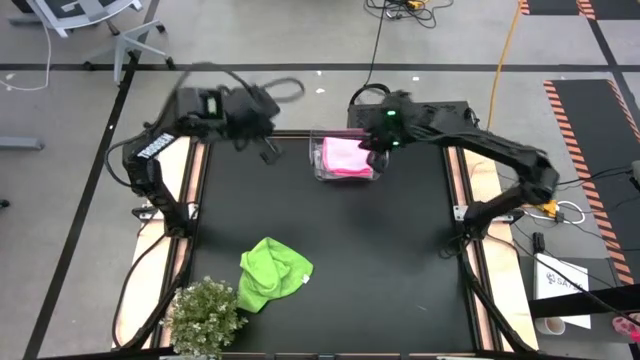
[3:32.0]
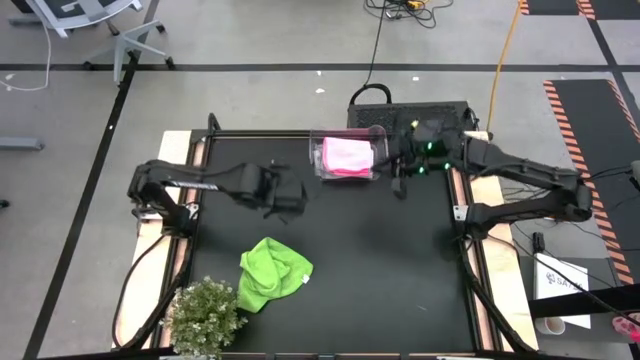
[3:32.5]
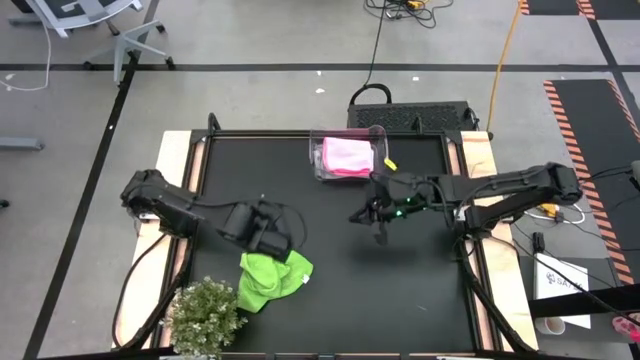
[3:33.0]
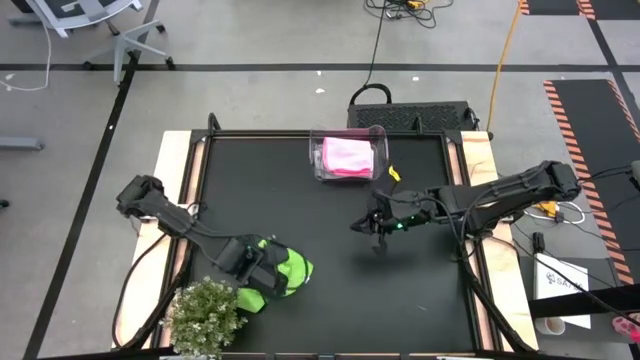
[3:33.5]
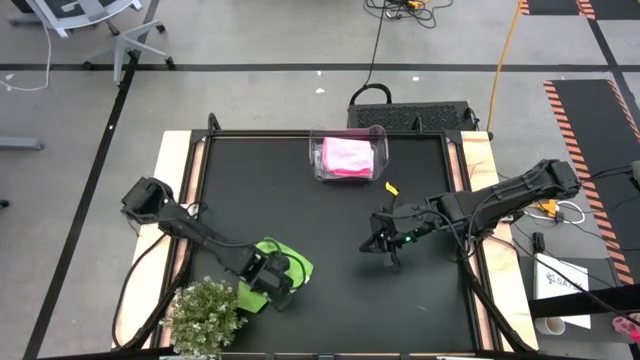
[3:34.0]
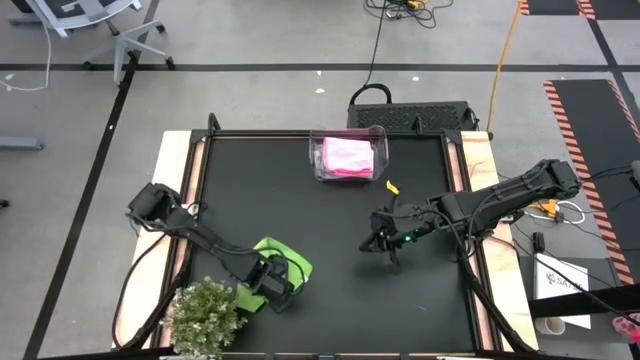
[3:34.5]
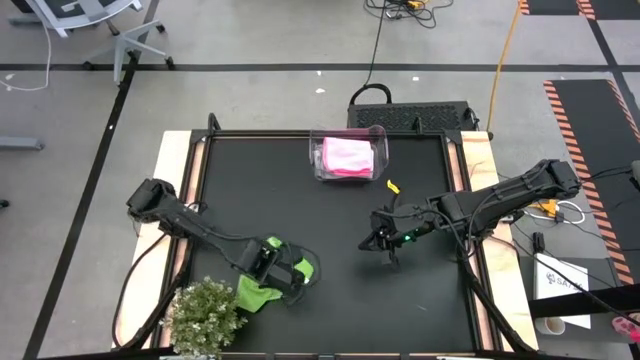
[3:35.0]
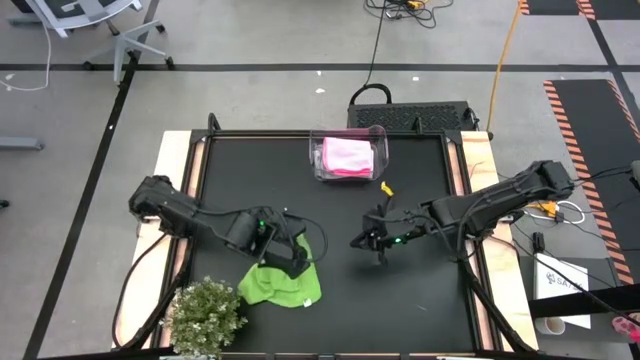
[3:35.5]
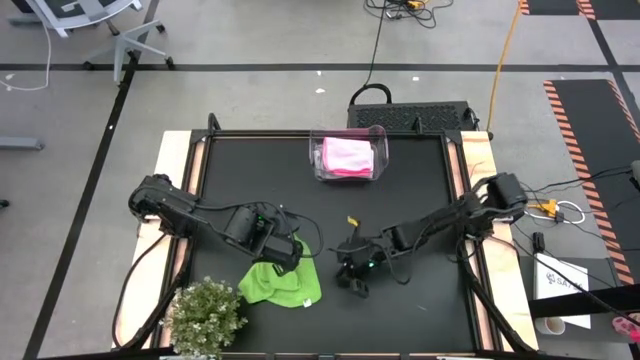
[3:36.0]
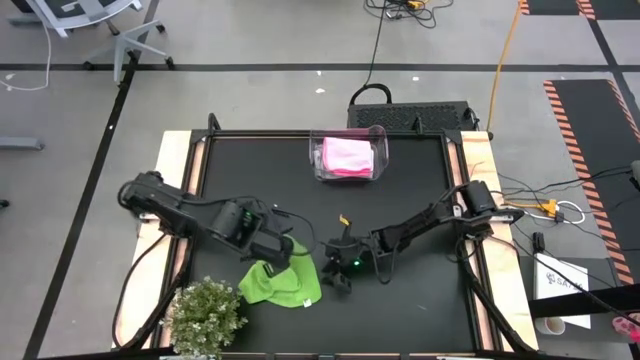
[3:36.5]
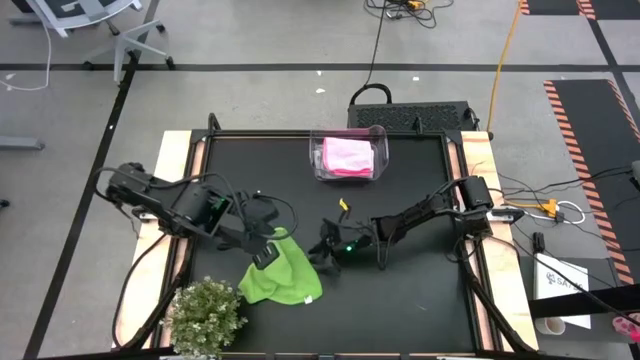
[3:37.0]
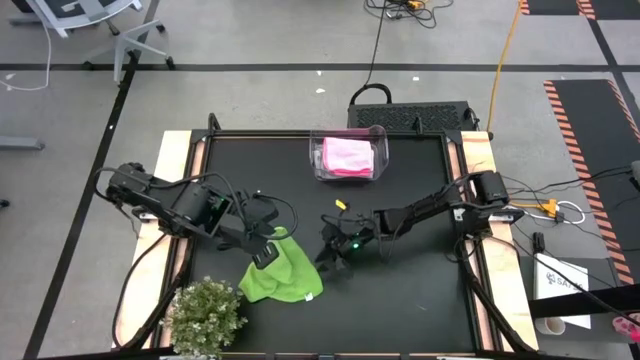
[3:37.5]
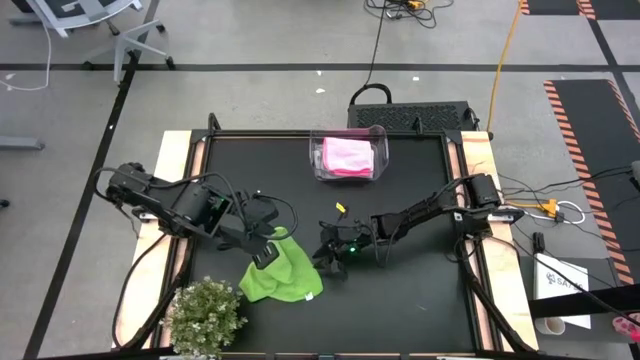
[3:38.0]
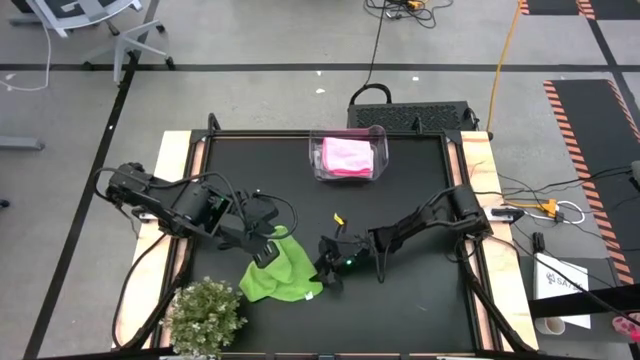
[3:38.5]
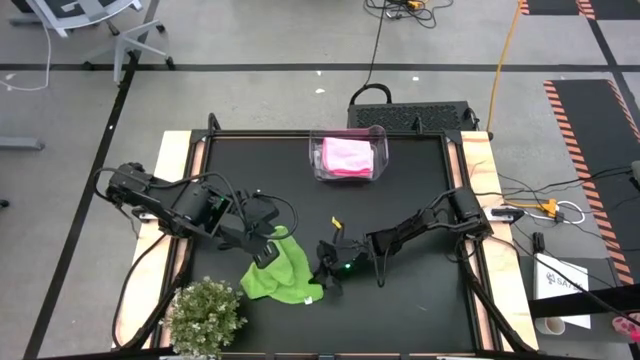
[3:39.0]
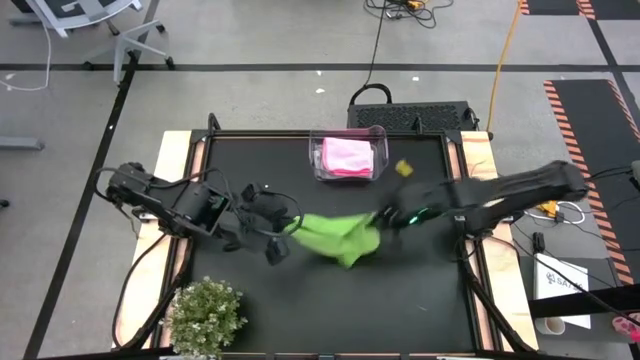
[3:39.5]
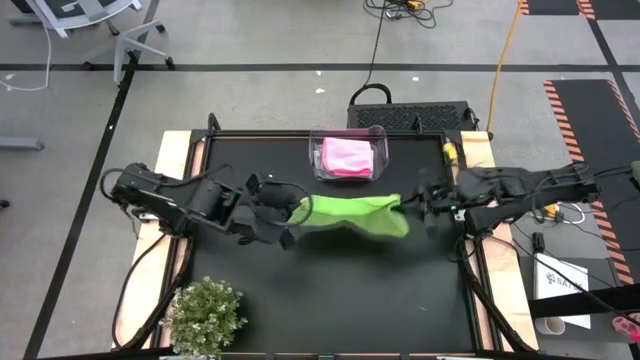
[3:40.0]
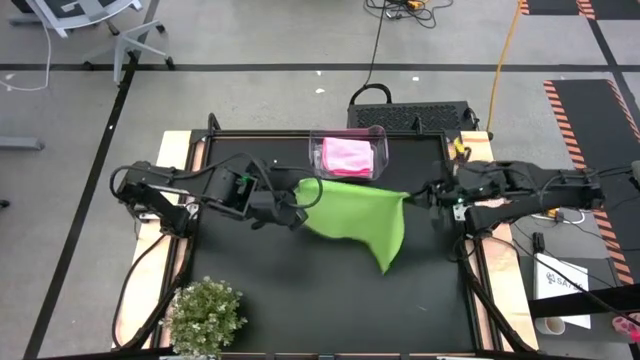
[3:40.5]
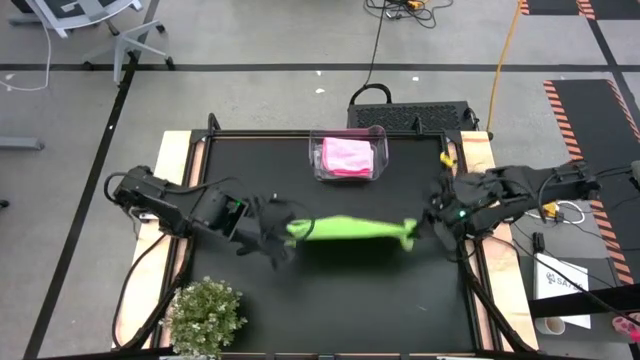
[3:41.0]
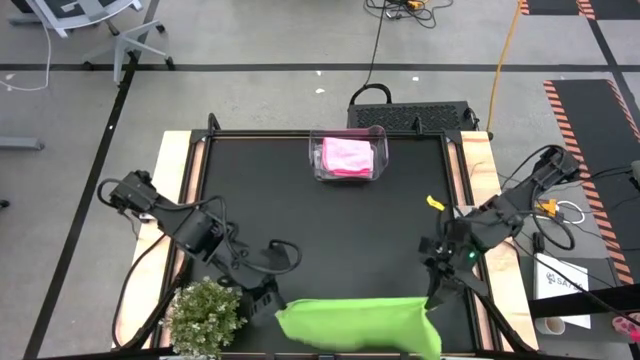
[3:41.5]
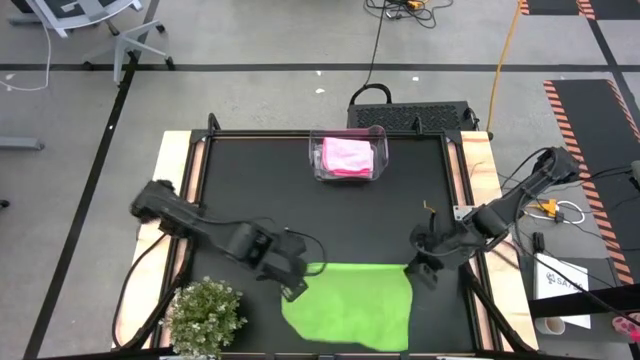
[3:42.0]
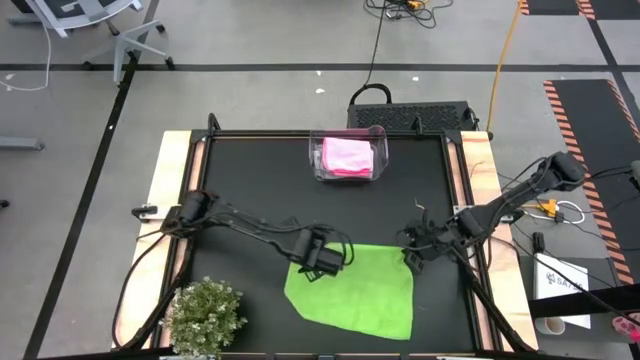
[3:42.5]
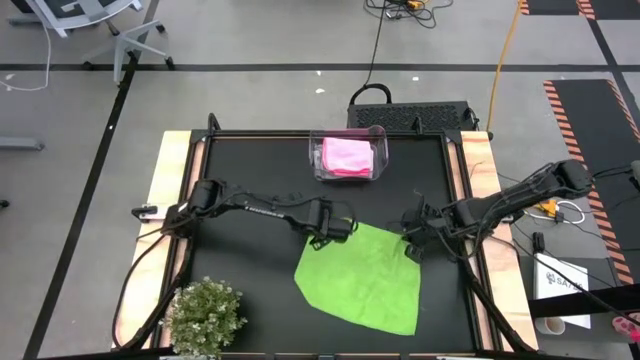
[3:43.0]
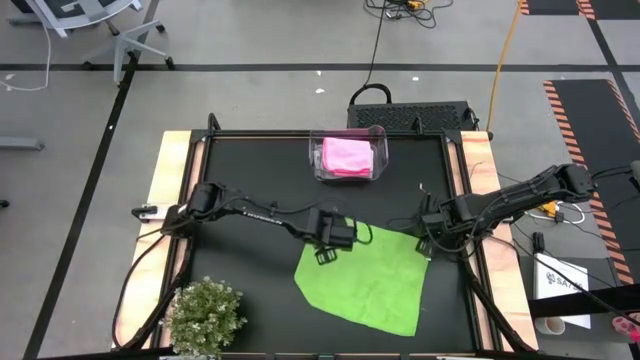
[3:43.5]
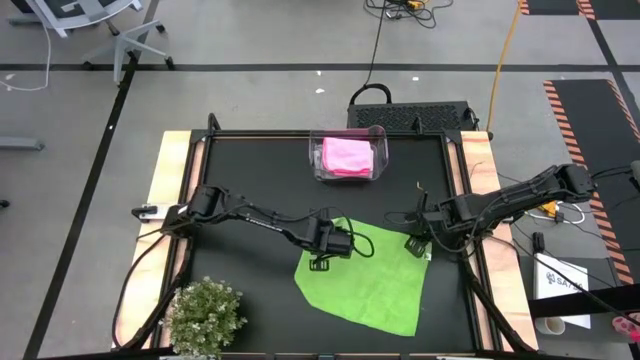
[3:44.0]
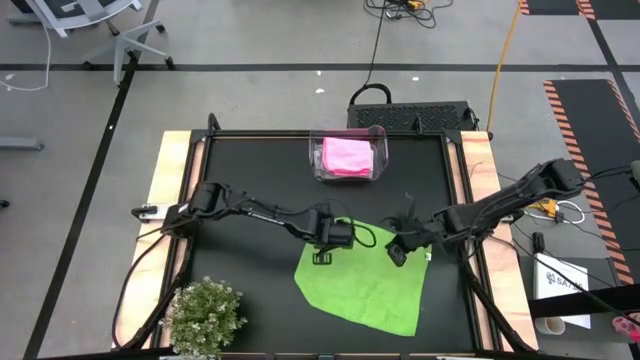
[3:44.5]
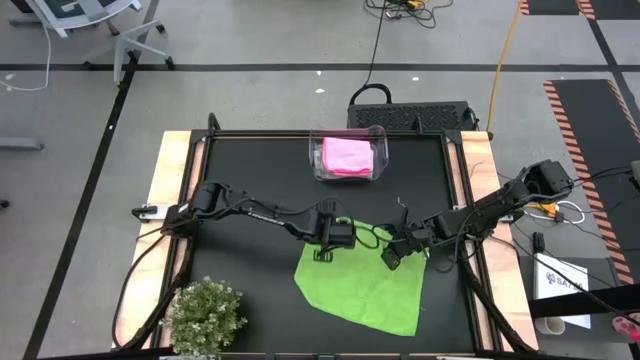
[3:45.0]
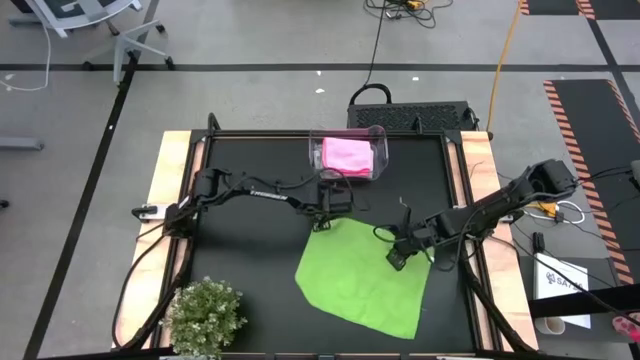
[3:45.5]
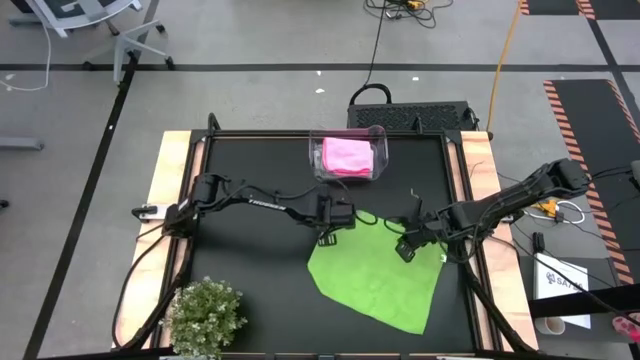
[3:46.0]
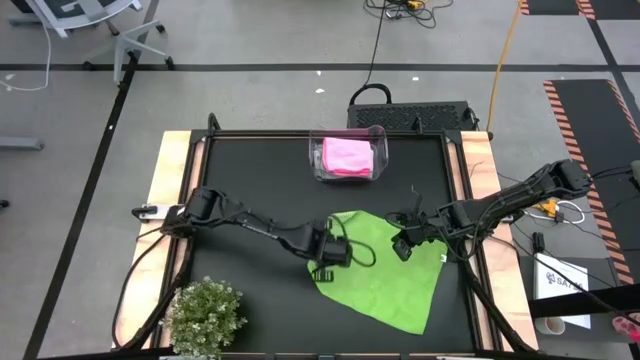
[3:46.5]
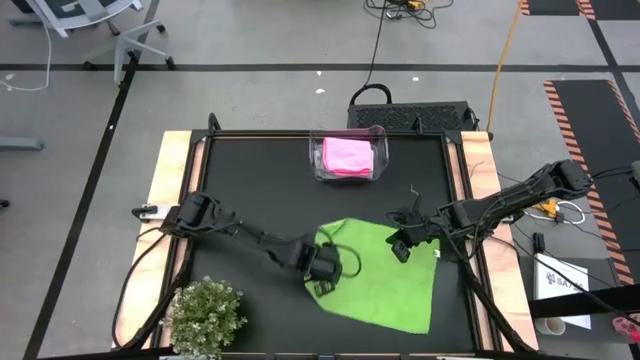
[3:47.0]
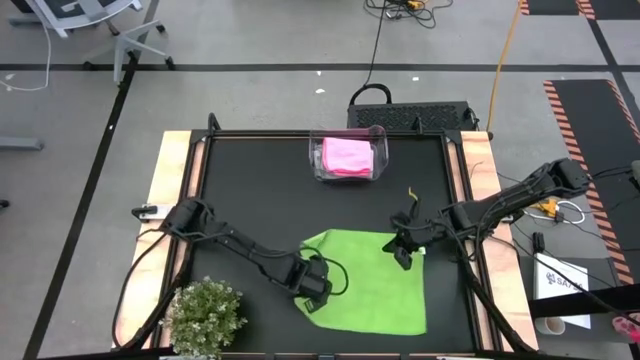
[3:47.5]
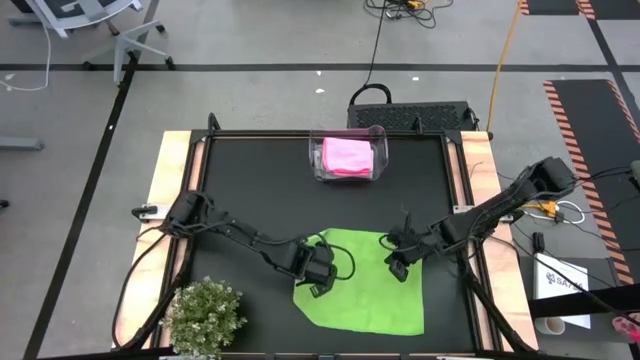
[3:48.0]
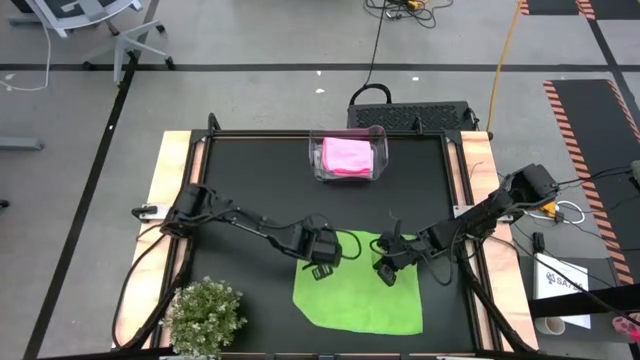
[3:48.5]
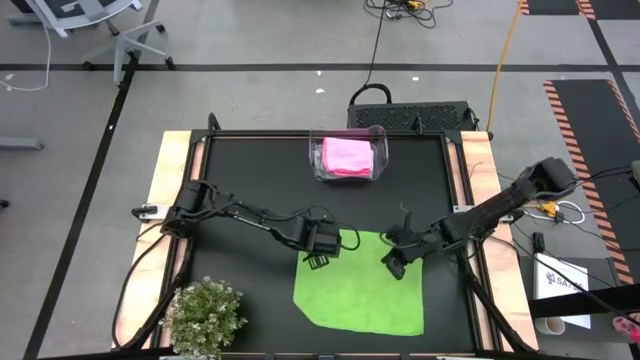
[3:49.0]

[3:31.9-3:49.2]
Task: Fold microfiber towels
Fold the green microfiber cloth

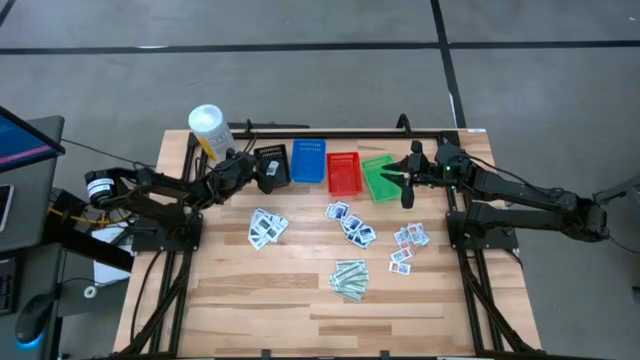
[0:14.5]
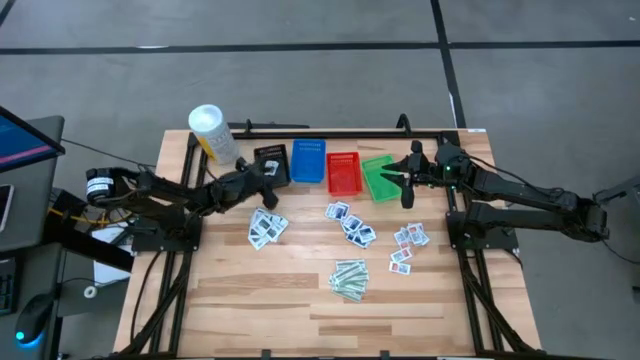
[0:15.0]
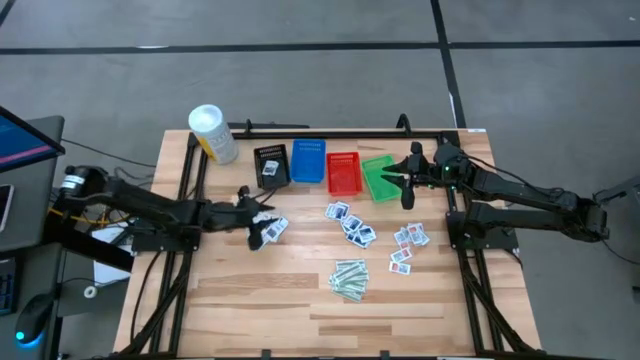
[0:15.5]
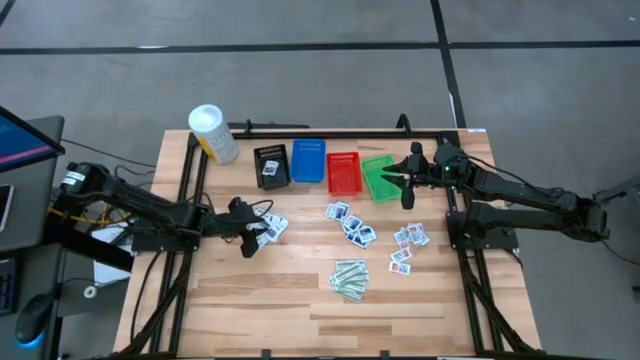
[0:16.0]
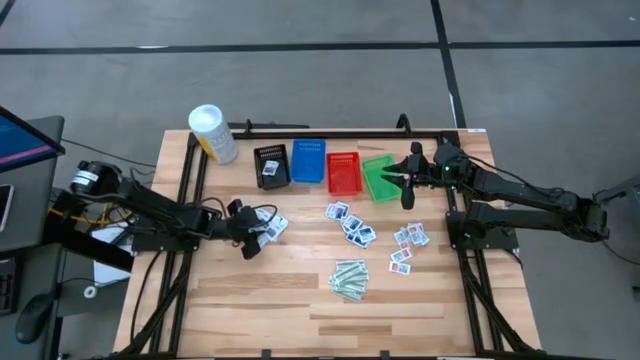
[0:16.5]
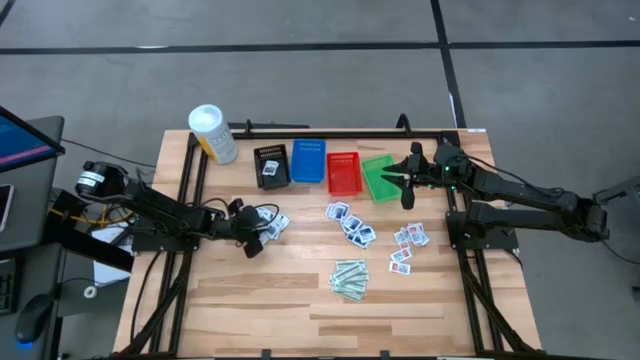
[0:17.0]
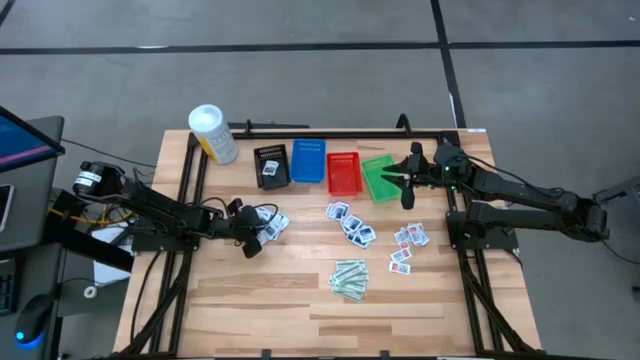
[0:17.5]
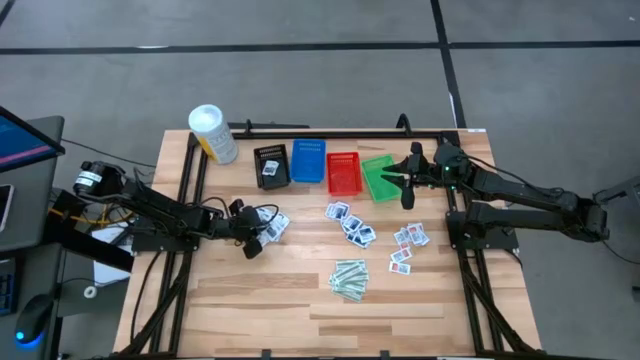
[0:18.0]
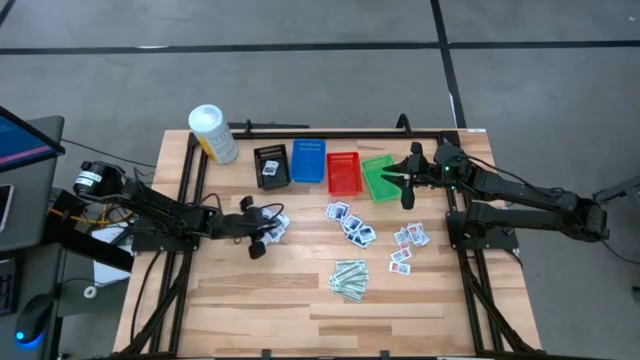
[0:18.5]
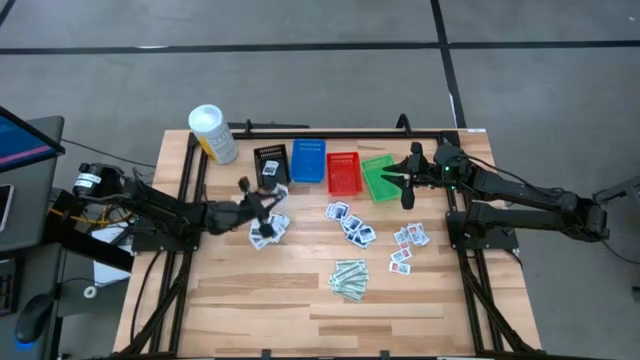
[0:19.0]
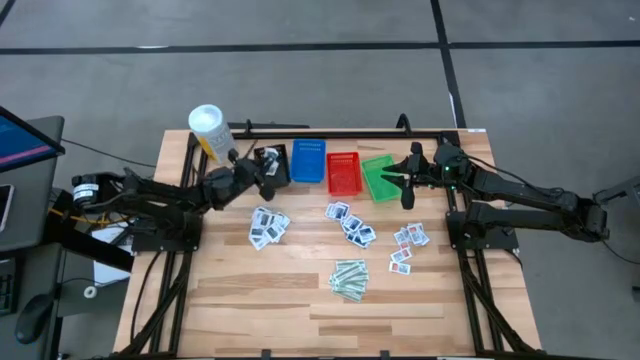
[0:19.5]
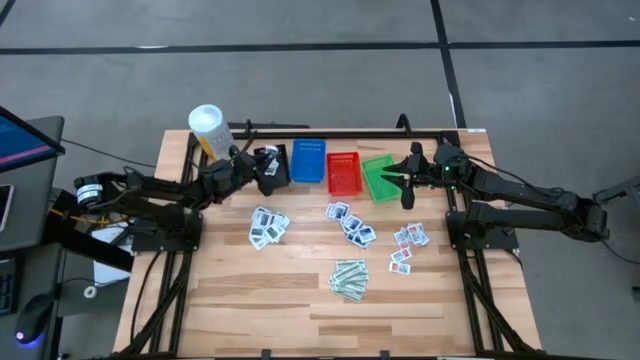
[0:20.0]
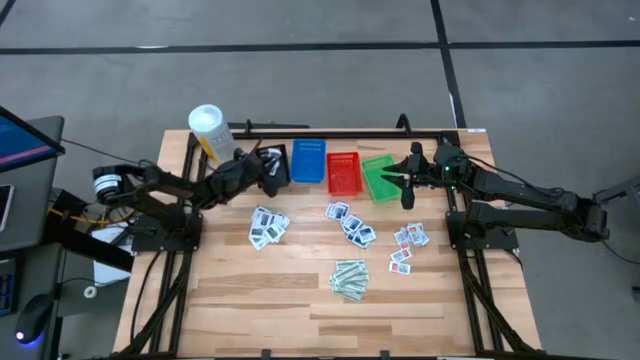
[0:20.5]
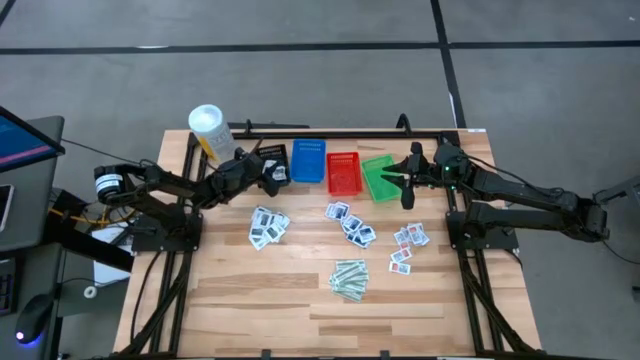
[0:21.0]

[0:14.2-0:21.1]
Task: Pick & Place First Aid Supplies
Put the gray pad into the black bin
